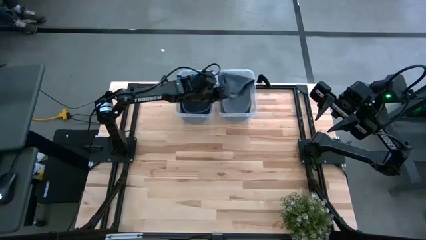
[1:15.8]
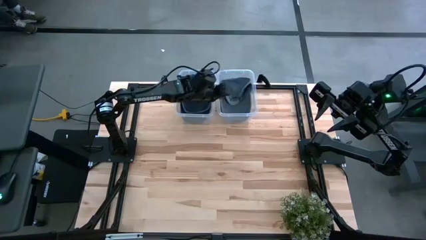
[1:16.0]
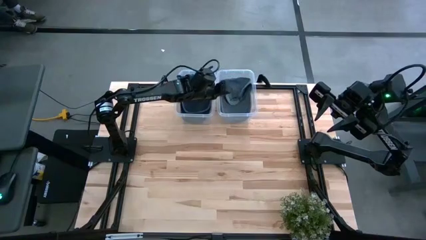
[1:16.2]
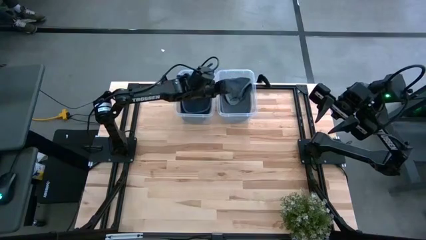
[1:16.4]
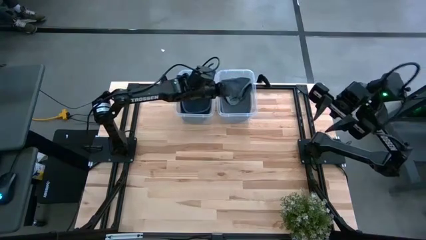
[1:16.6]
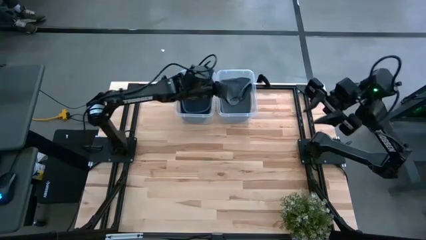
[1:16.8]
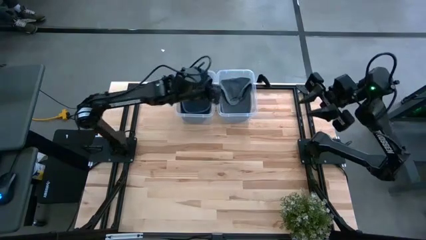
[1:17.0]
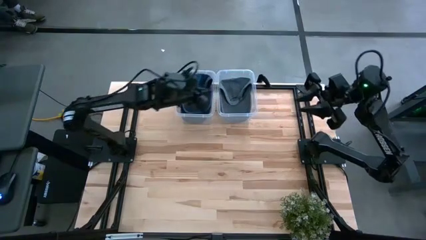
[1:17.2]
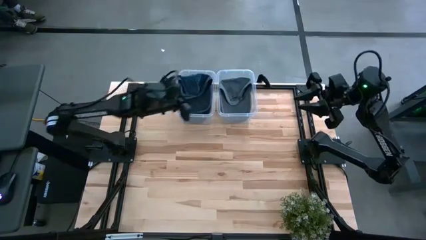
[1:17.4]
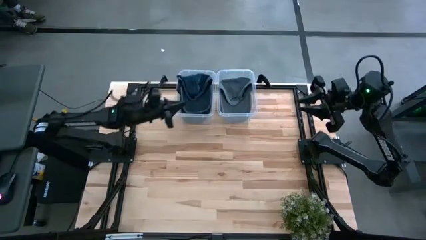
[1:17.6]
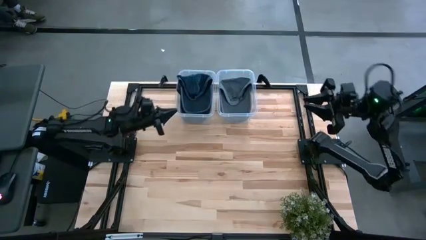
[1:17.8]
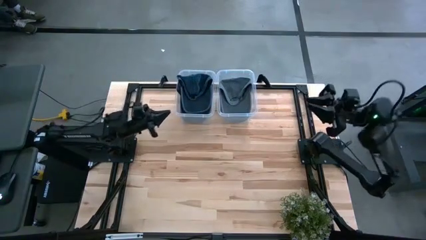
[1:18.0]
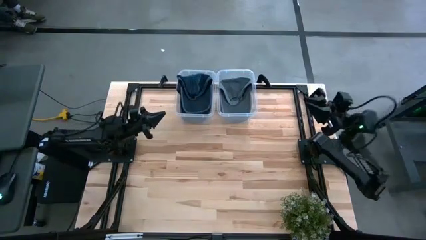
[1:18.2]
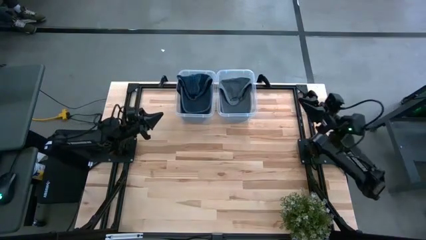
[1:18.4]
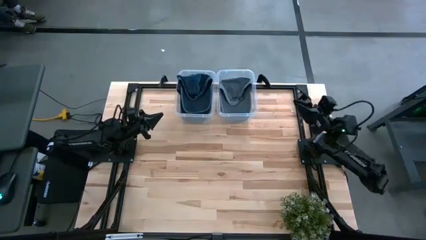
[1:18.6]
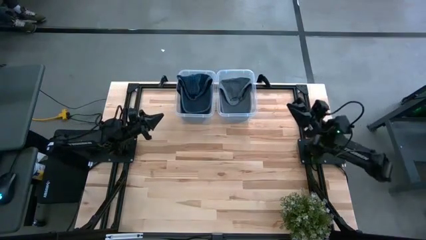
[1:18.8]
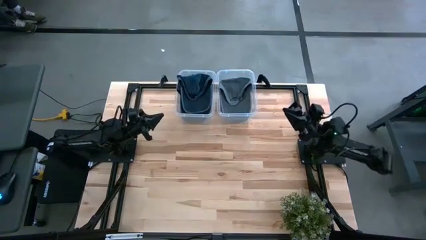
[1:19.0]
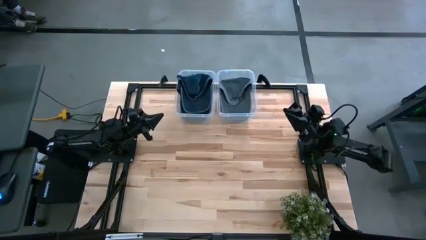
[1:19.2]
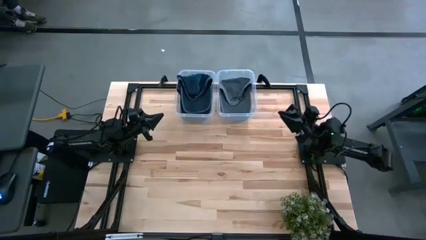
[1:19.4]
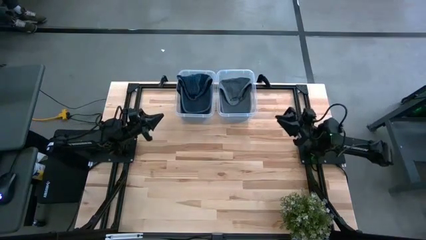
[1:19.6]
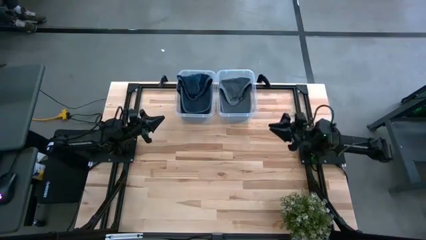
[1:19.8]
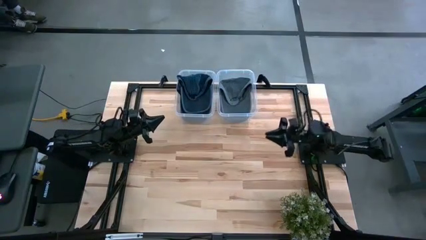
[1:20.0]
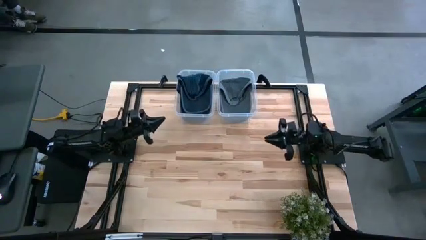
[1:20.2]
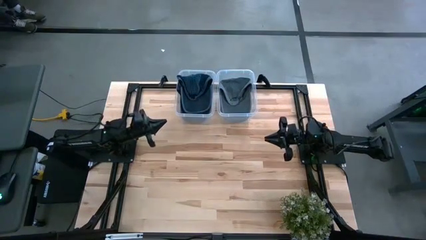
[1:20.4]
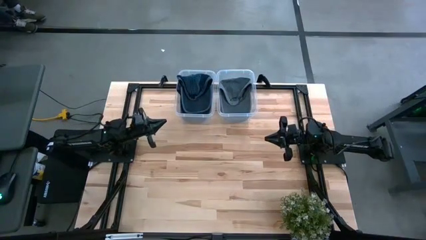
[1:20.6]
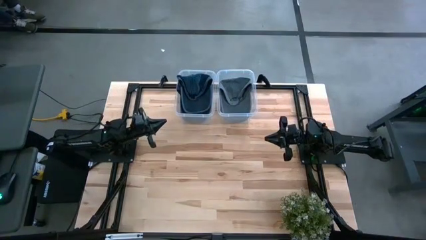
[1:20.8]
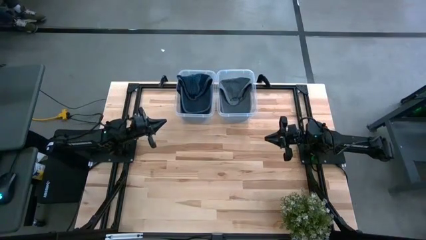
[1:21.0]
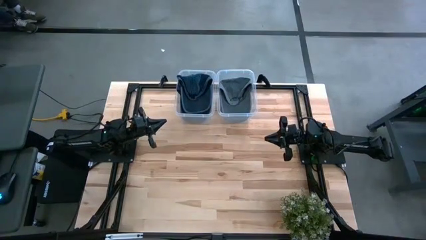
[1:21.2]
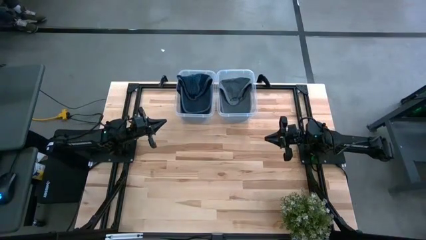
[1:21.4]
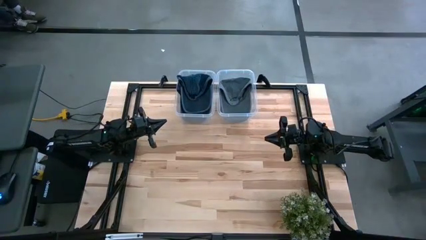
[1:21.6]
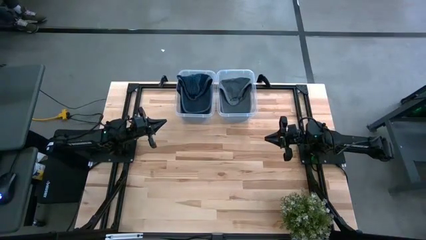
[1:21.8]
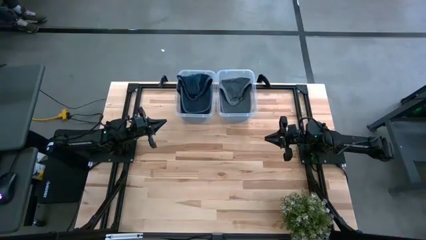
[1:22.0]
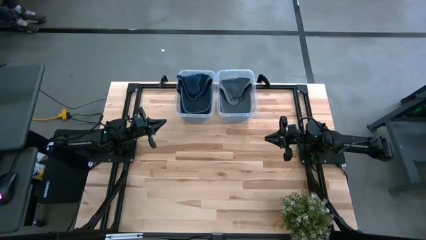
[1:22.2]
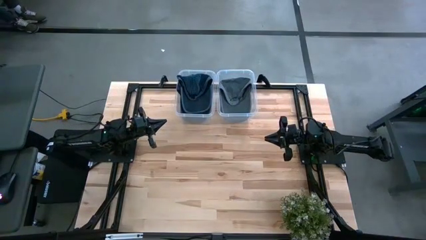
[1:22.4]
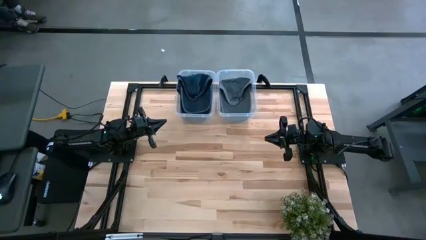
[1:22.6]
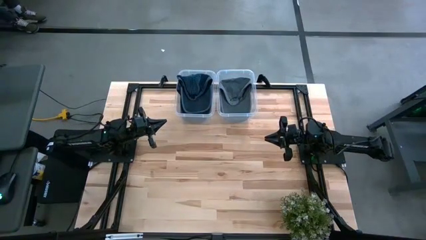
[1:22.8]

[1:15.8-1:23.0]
Task: Pick and place caps into container
Return to home position

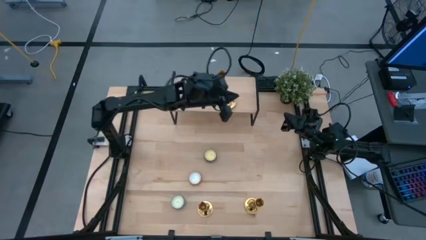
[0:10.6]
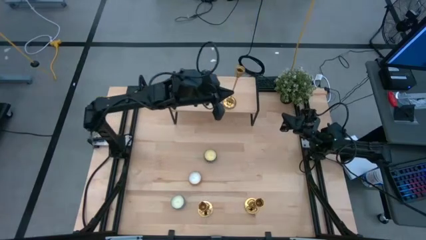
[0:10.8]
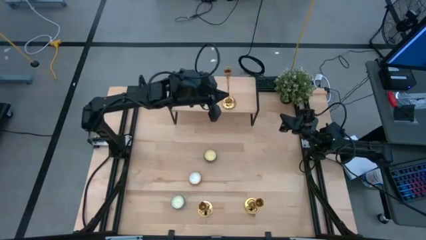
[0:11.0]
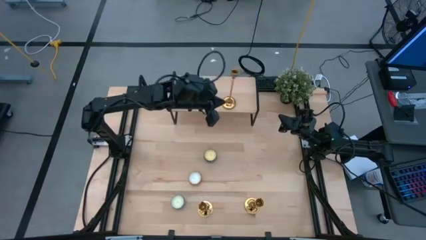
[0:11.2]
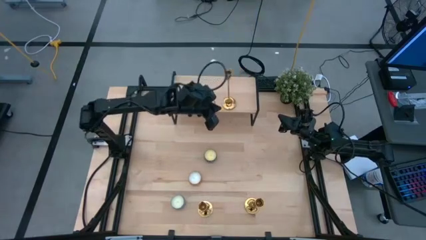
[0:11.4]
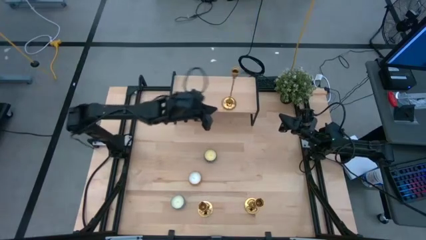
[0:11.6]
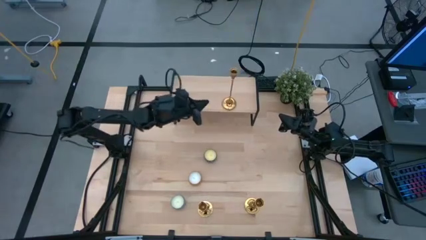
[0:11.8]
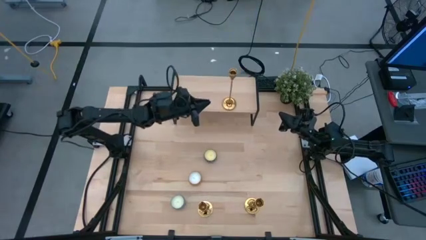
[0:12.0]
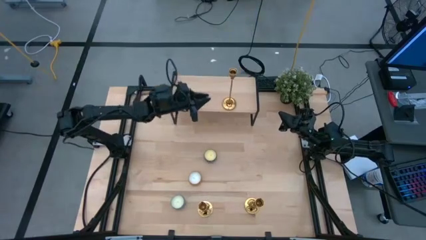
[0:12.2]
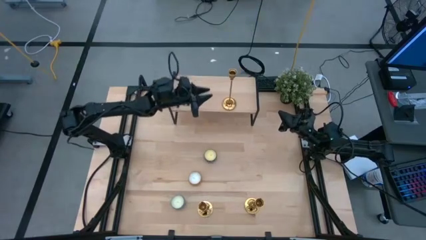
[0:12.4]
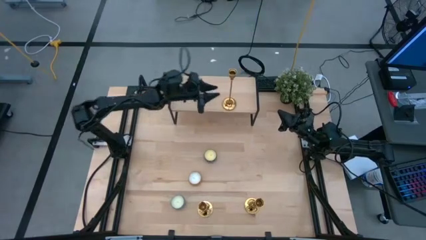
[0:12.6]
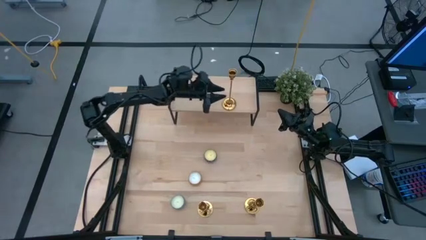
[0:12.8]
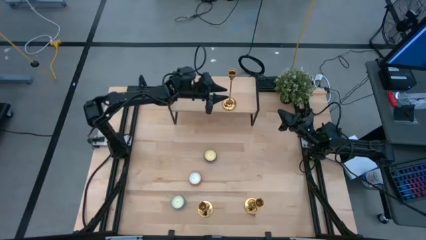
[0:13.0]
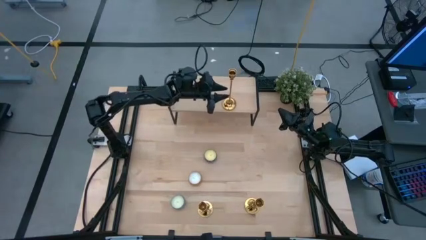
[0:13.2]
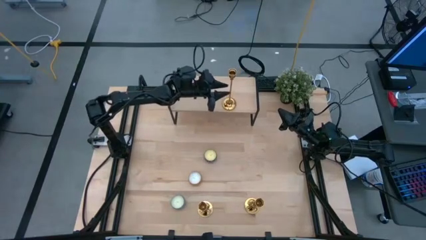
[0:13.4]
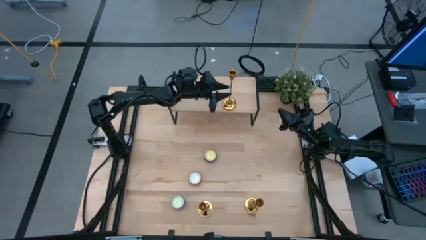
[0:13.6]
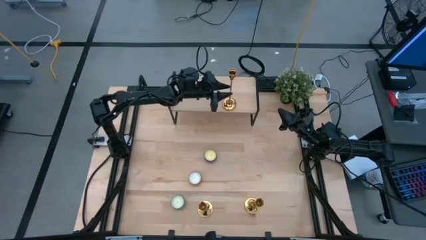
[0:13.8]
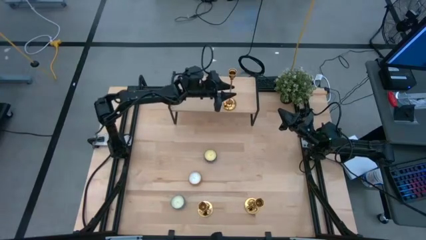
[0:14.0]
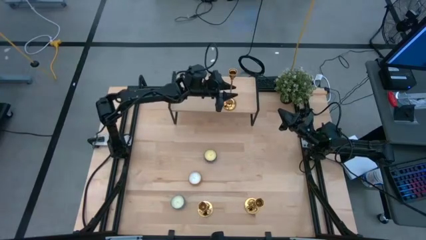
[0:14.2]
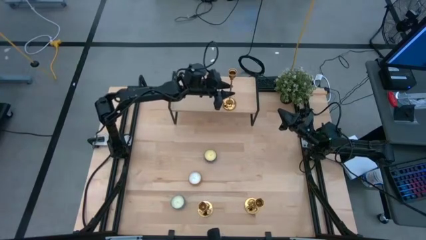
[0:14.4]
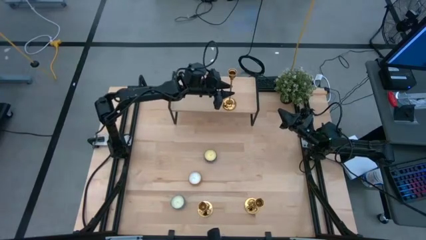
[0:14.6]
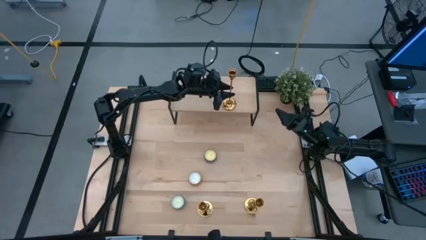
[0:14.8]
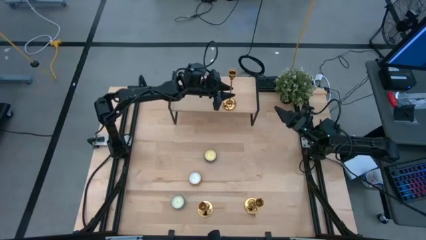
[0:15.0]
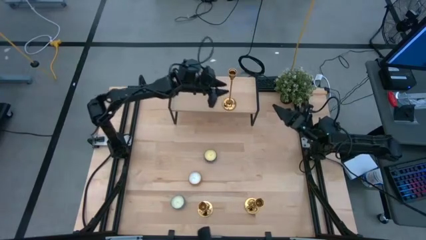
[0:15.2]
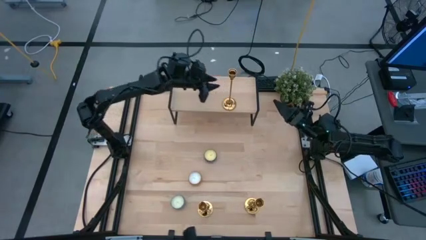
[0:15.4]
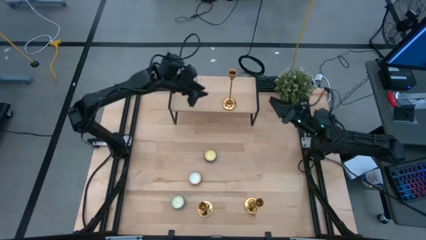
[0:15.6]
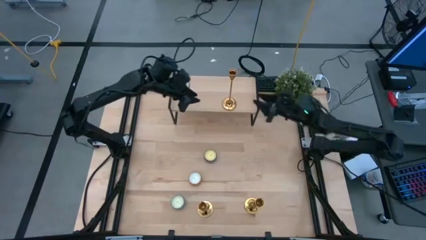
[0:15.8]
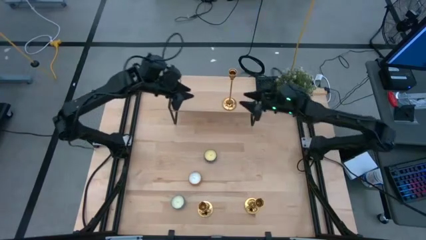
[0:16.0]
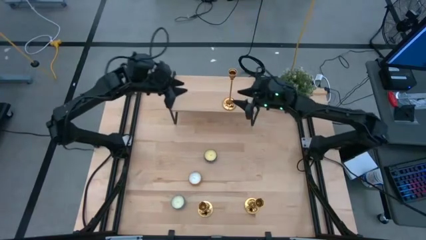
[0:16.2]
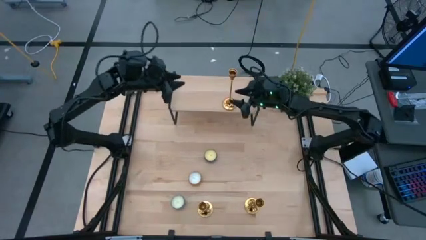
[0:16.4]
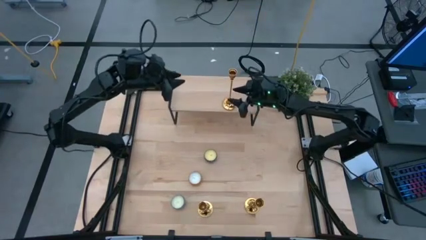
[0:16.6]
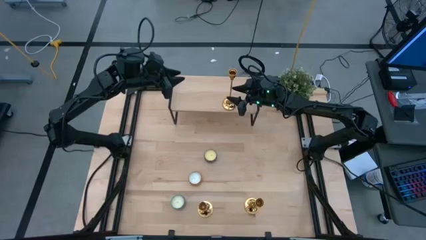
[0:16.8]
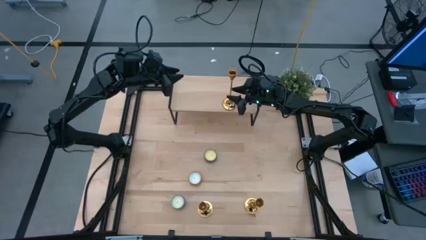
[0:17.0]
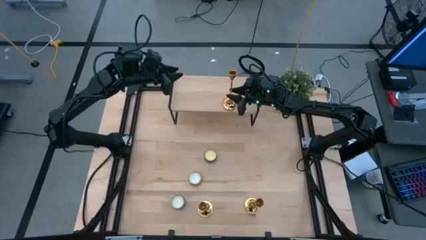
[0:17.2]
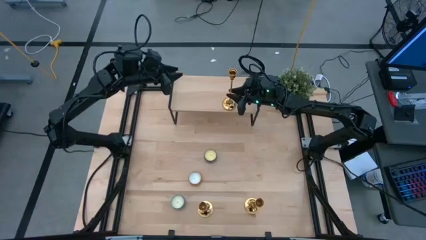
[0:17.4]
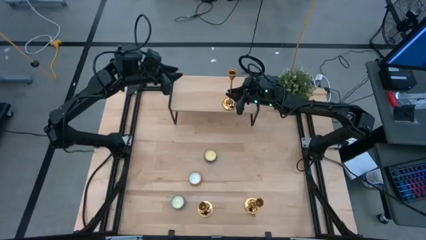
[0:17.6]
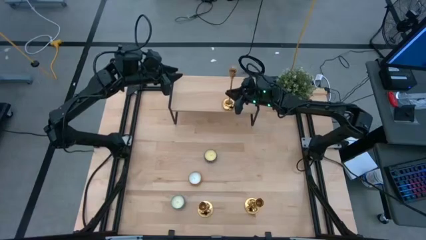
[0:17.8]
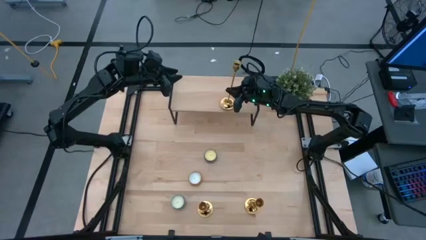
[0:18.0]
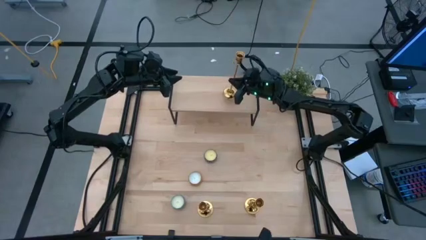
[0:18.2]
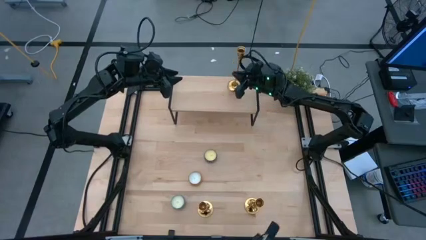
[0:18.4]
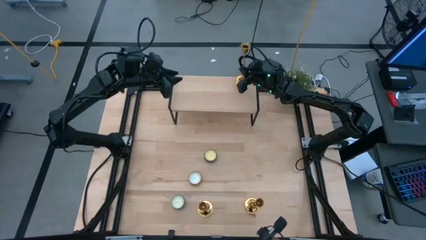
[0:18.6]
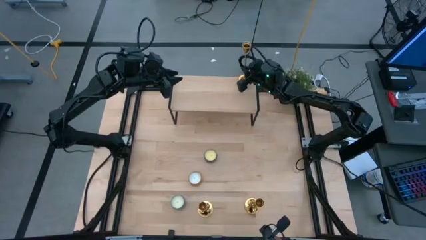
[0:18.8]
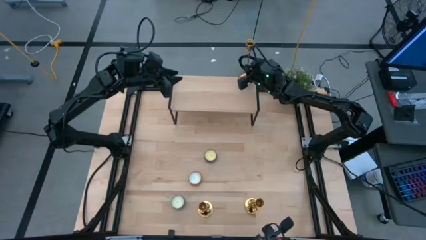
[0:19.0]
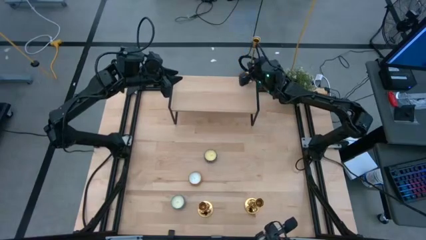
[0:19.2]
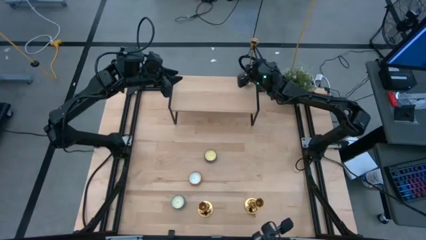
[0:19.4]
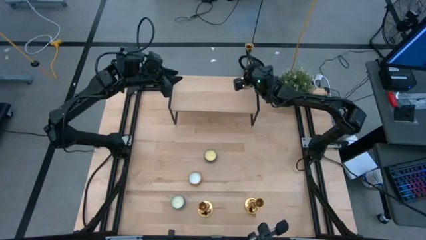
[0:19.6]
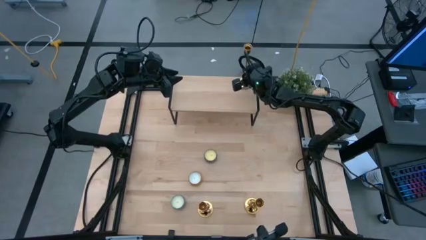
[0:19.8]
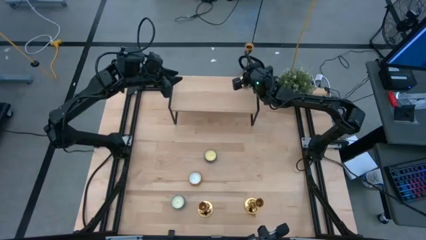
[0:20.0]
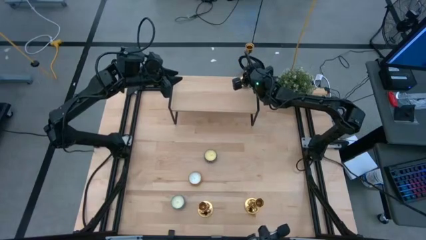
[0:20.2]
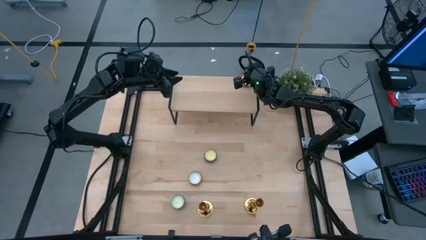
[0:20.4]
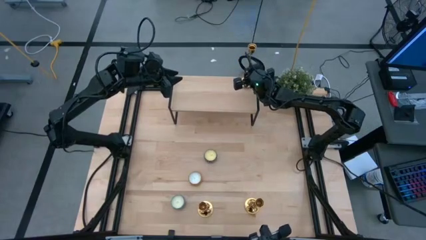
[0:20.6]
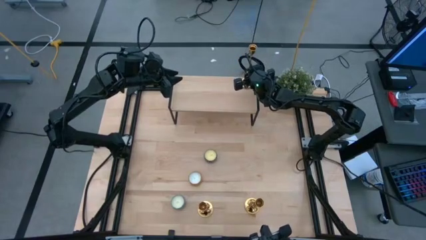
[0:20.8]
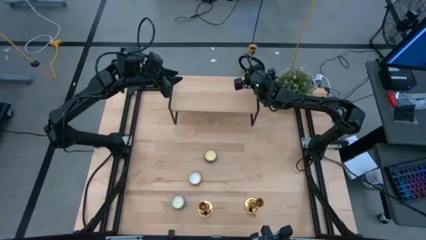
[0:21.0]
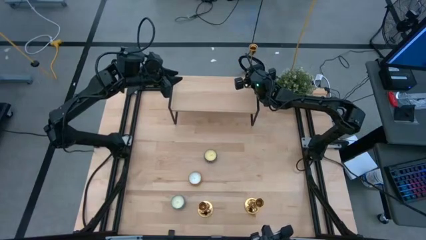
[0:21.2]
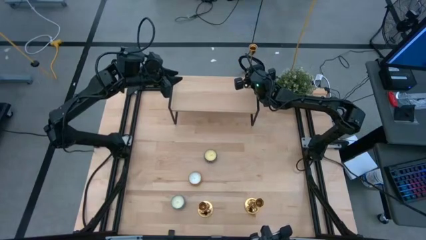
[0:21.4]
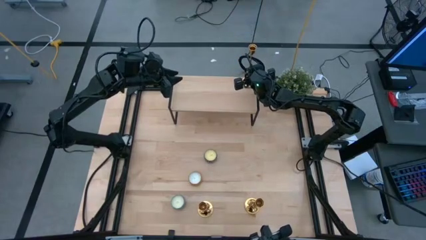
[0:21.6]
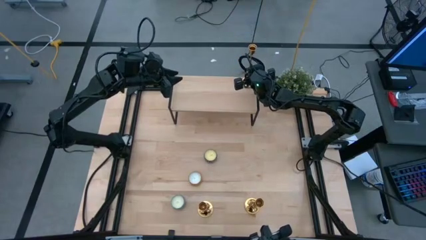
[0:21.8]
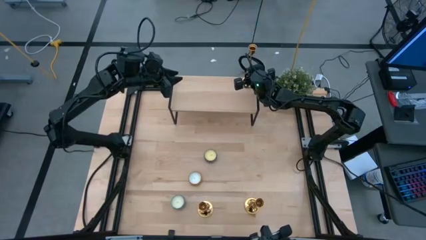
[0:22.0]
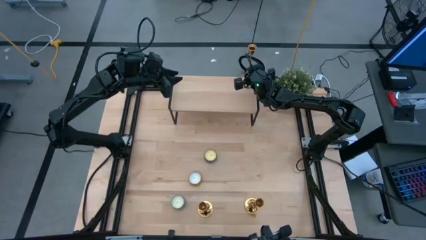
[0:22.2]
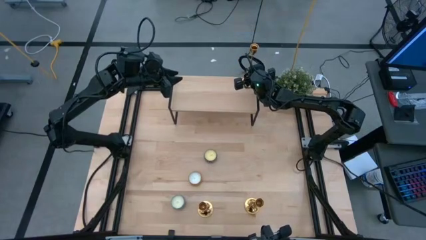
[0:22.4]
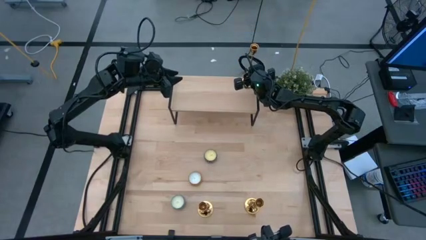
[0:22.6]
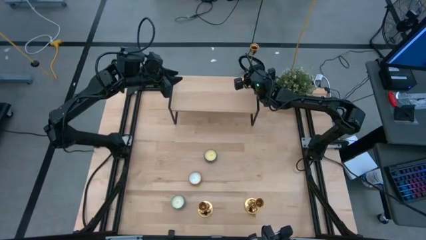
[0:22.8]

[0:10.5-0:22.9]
Task: Pick & Place candle stick holders
Put the top gold candle holder on the shelf
